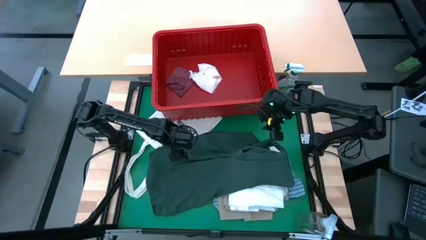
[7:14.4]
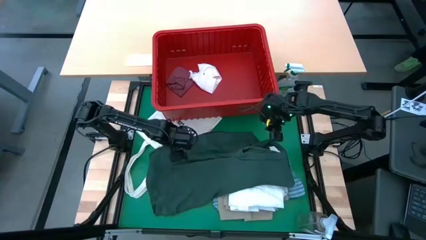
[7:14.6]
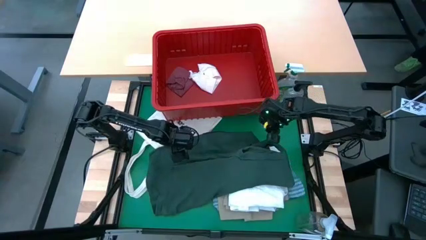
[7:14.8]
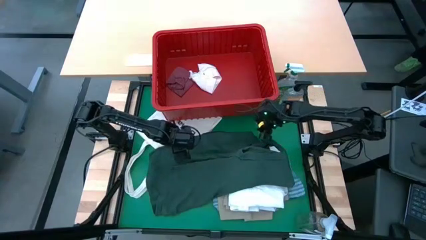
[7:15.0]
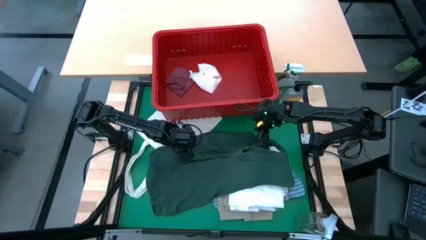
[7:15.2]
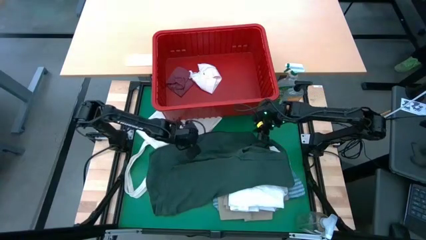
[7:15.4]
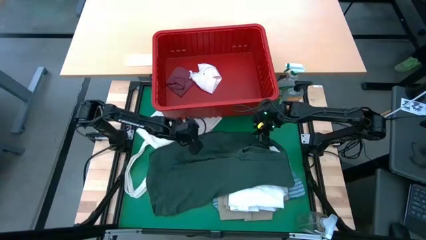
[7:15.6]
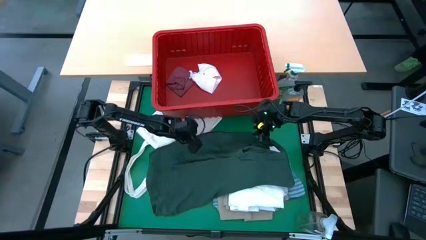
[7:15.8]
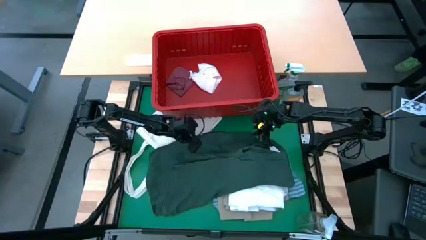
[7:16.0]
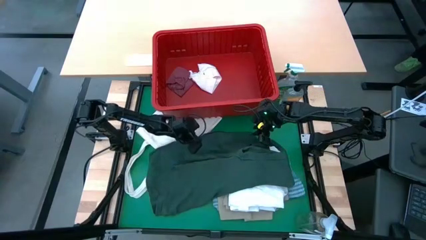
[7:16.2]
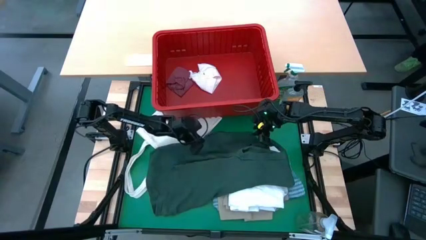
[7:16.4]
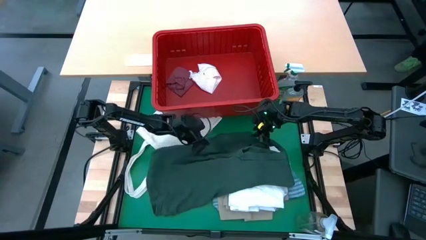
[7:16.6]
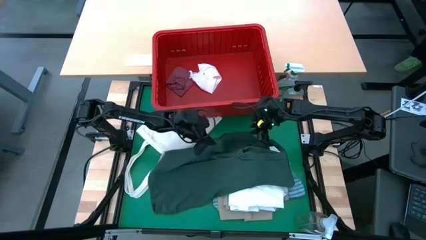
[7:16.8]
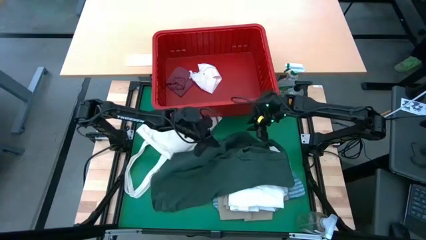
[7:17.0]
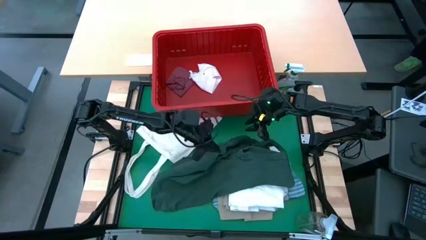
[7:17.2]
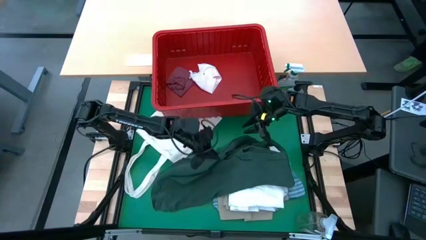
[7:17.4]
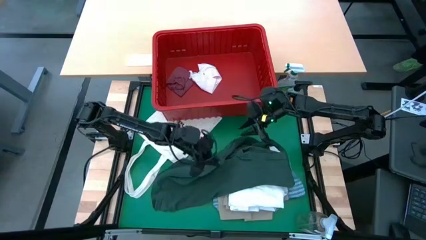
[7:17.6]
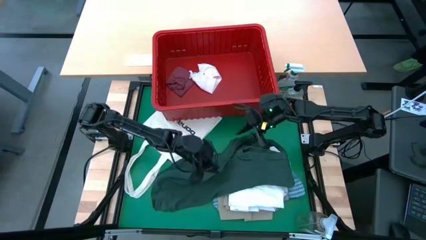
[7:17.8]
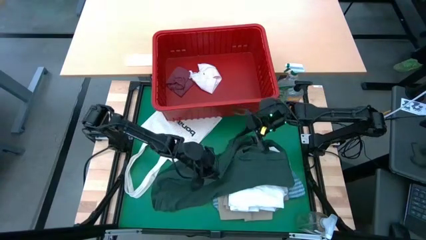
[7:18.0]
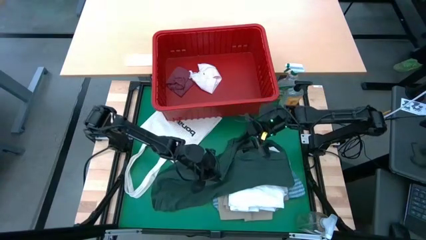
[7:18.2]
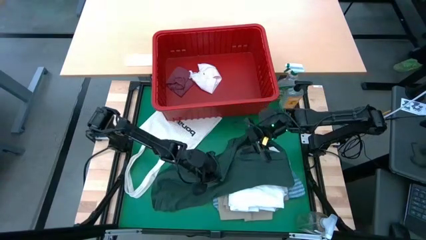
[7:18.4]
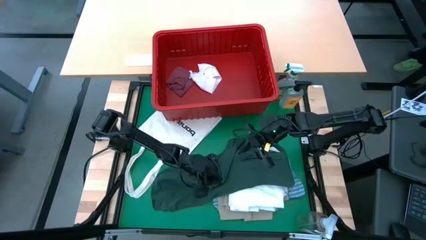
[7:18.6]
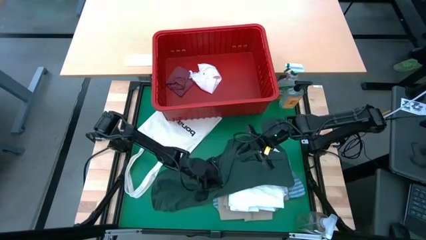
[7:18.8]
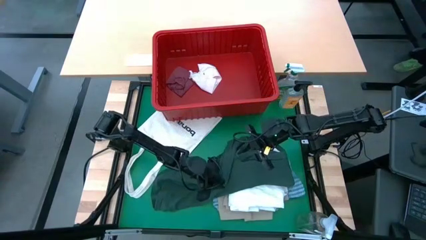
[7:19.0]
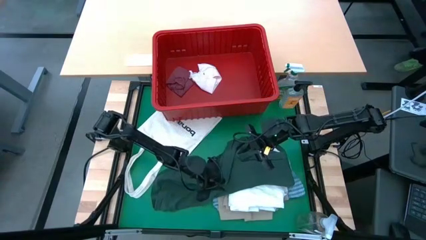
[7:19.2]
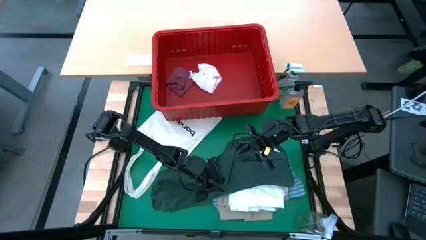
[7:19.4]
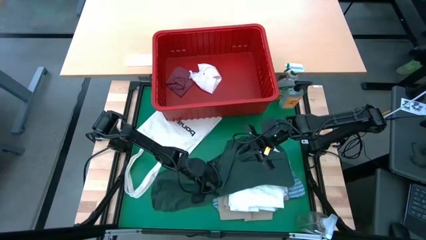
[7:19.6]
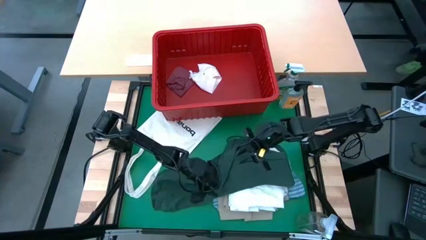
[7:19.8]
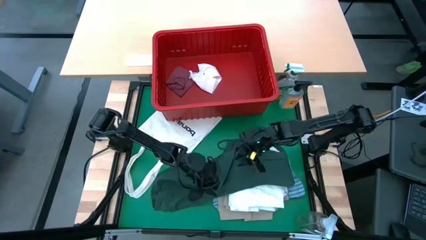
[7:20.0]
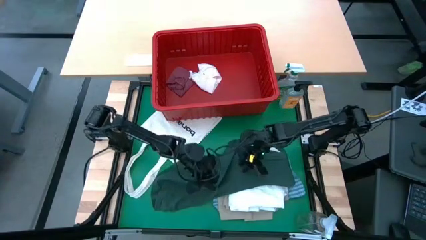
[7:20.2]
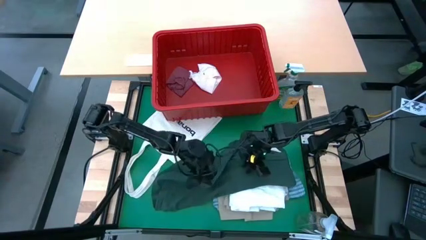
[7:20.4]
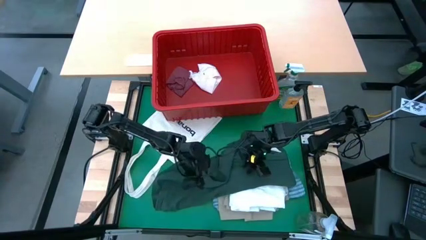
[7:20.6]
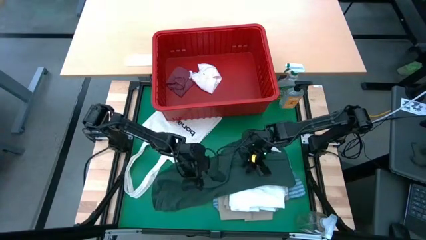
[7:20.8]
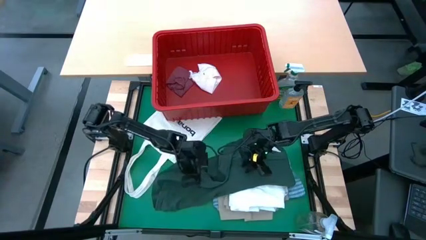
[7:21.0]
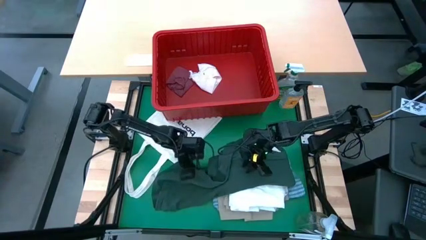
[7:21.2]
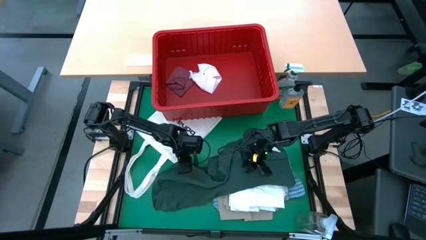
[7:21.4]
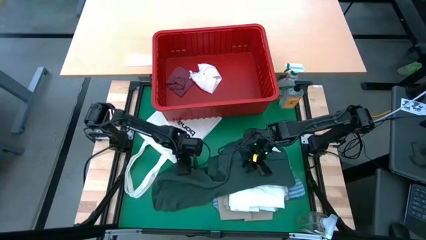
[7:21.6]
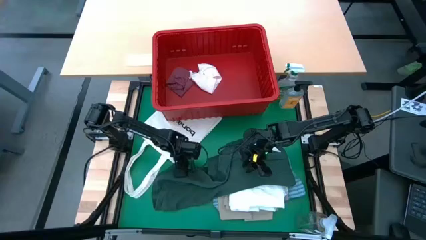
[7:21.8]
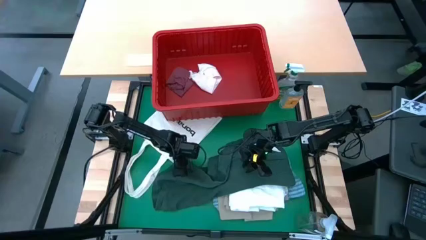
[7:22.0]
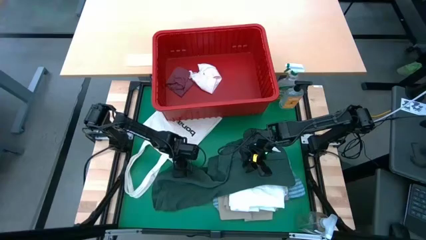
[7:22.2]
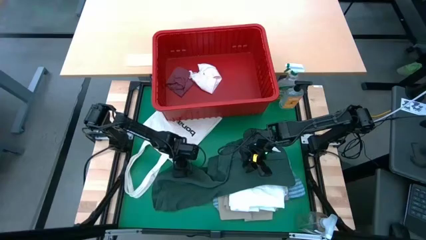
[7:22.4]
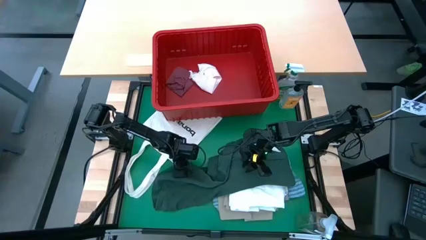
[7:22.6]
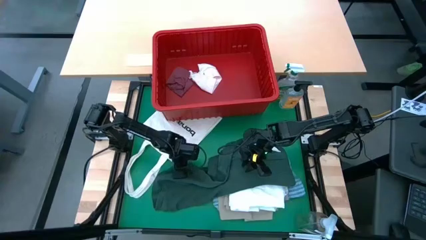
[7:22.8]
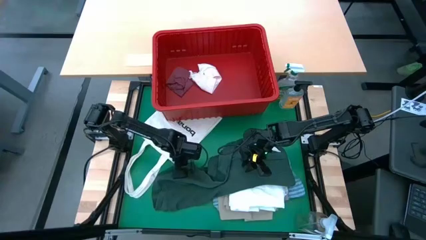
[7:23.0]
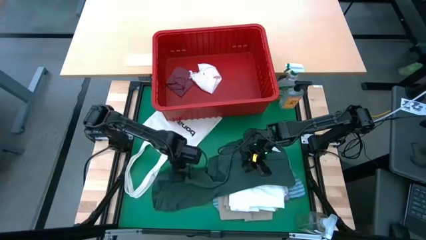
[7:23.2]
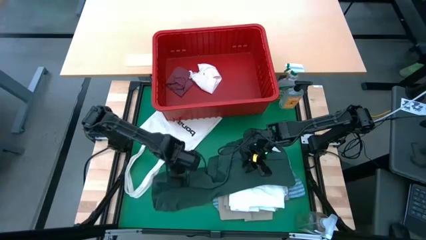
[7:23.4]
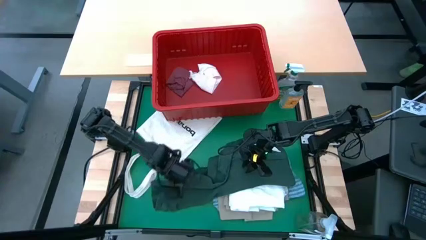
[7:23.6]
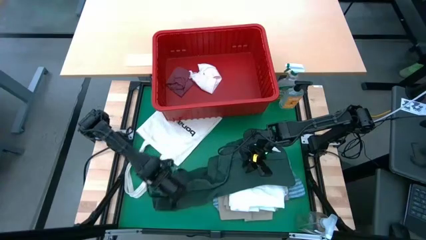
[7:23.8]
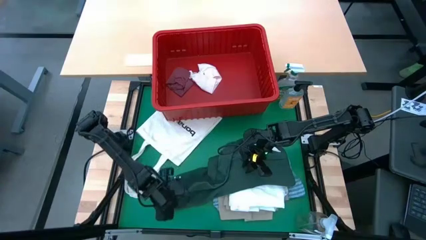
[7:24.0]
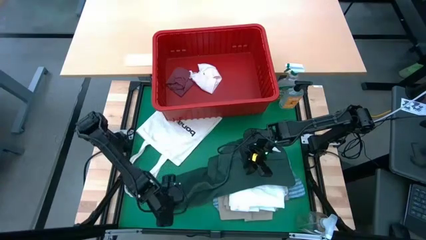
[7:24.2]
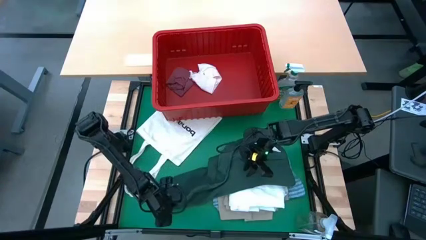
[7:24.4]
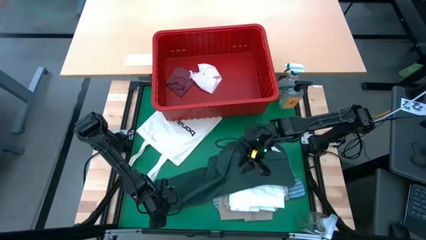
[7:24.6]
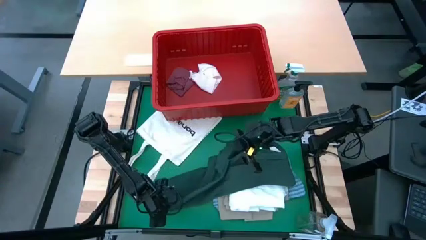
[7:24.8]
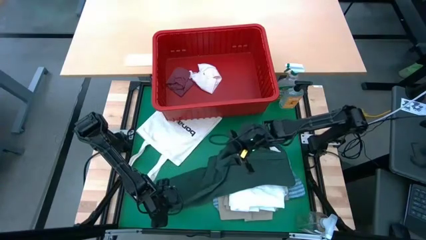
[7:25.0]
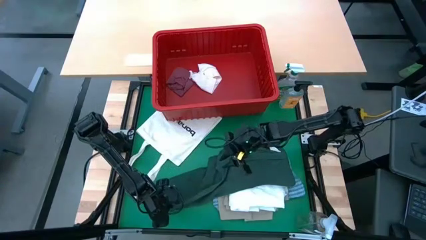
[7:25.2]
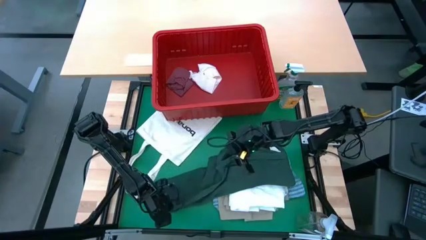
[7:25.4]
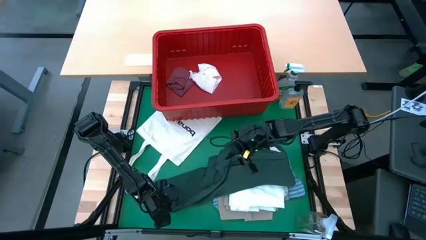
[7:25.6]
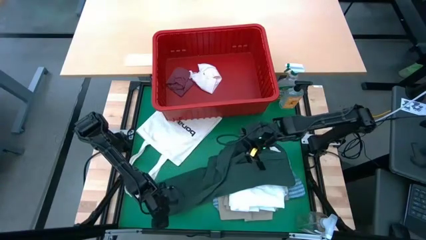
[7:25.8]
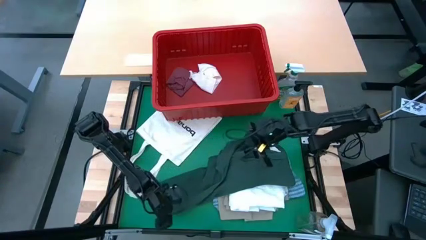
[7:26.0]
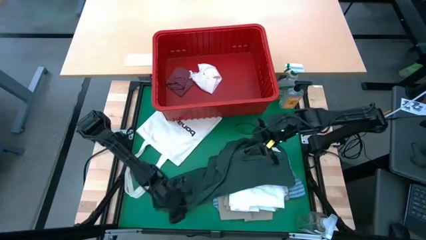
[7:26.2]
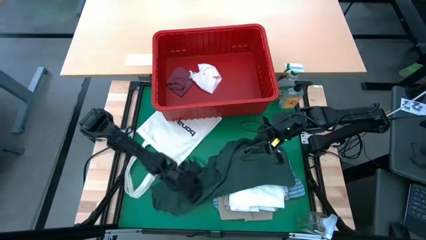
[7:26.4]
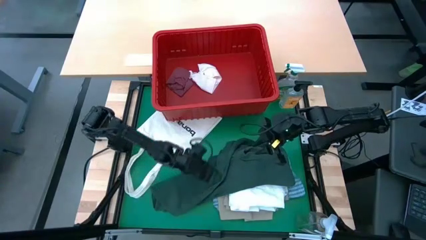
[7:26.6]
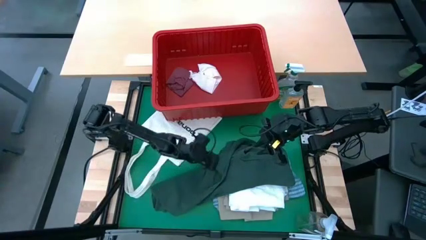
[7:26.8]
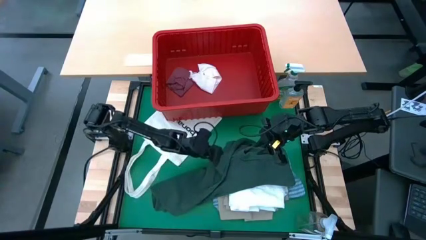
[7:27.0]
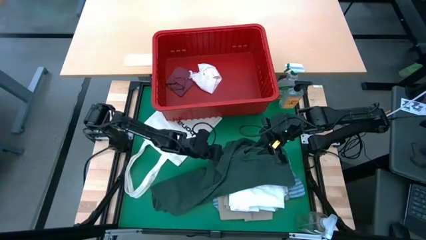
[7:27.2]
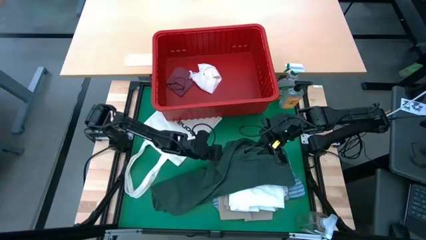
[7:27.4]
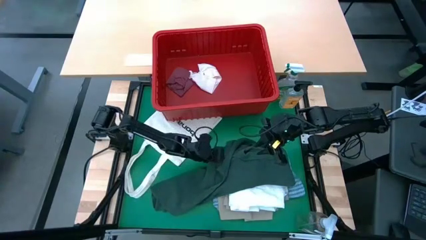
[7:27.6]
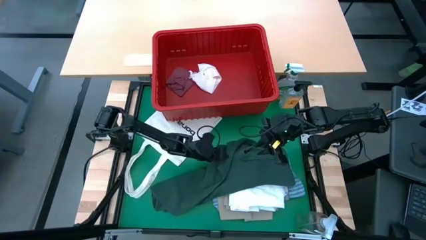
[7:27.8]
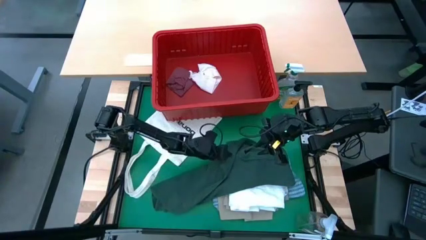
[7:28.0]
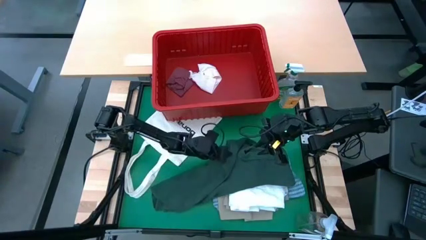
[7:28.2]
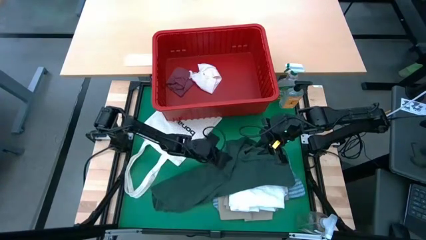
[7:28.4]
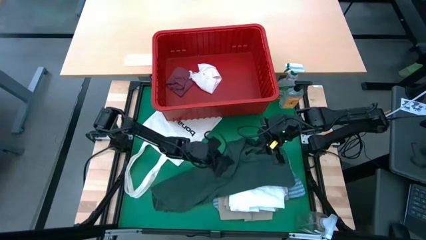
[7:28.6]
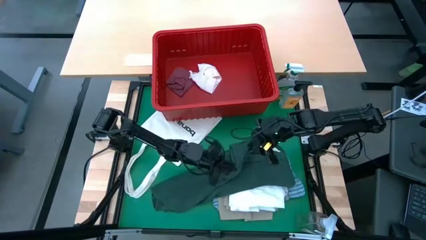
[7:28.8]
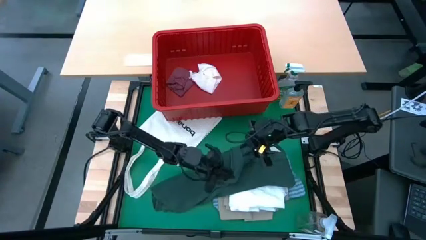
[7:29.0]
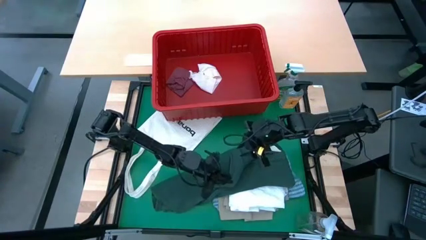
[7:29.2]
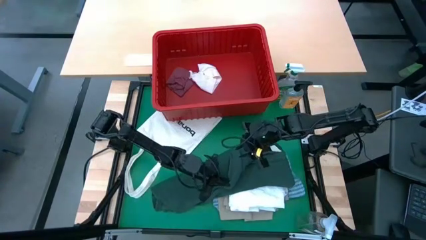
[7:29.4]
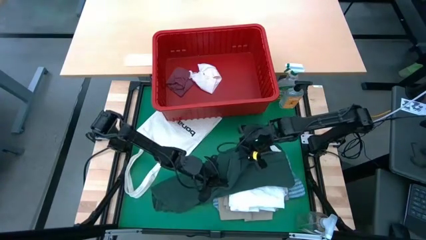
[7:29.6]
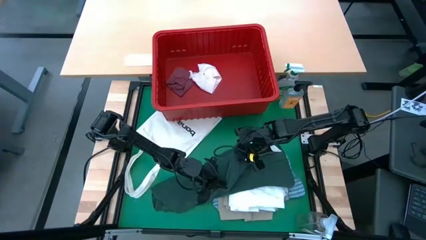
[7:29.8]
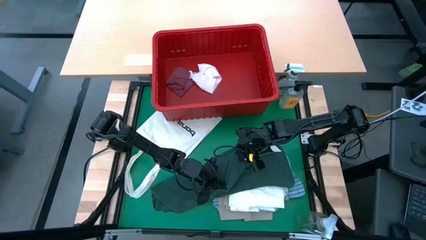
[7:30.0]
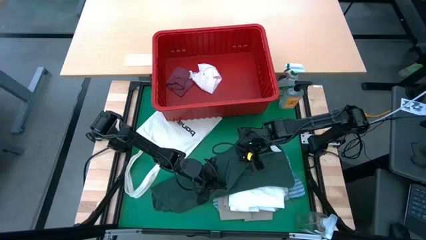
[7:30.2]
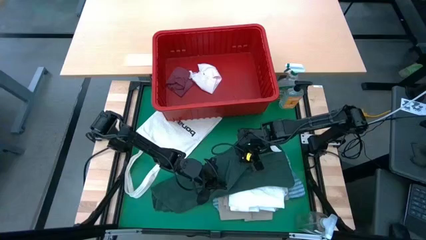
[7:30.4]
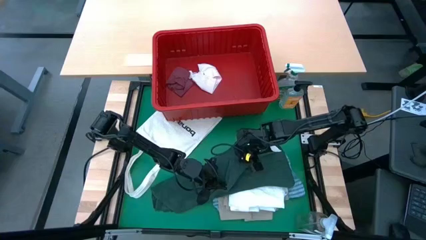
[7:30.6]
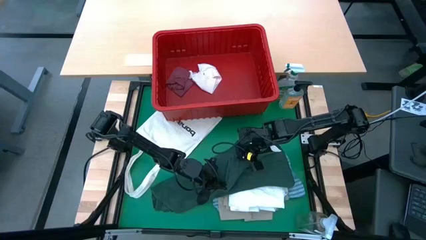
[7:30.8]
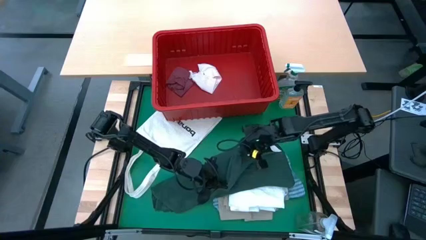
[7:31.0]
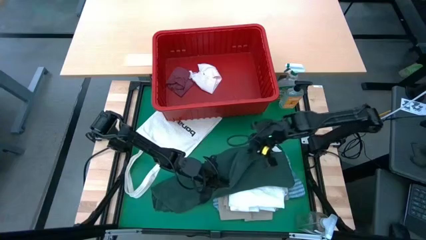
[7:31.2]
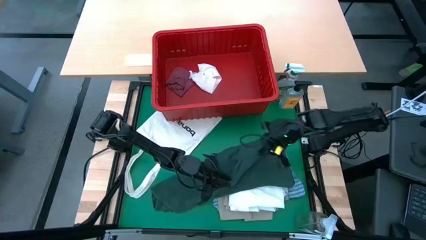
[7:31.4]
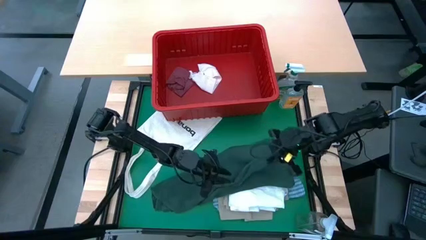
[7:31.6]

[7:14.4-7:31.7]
Task: Fold Laundry from Bin
Fold the green shirt
